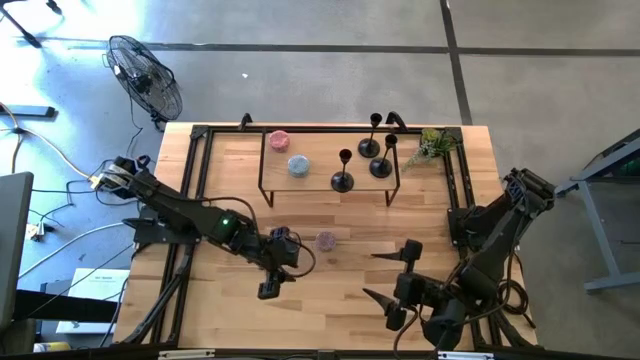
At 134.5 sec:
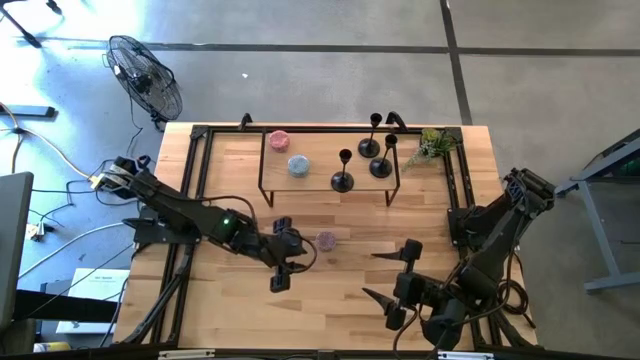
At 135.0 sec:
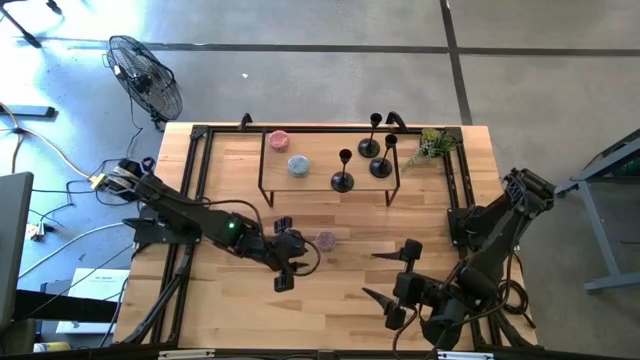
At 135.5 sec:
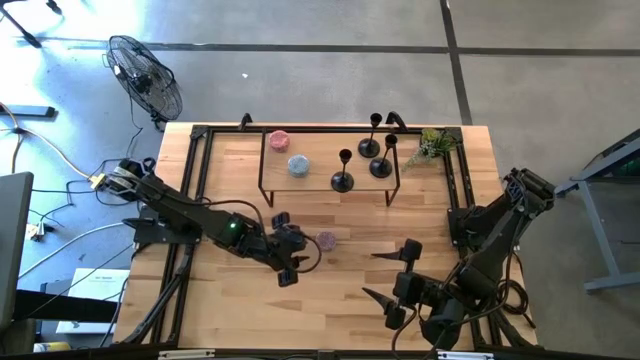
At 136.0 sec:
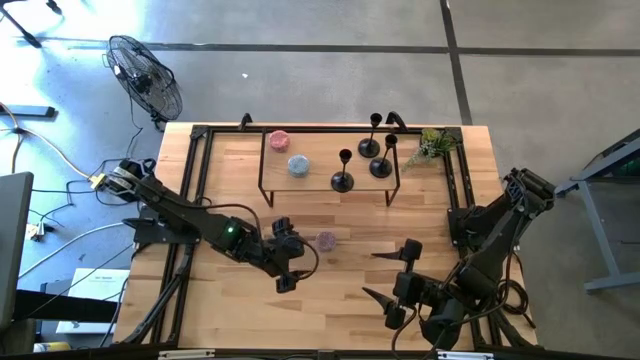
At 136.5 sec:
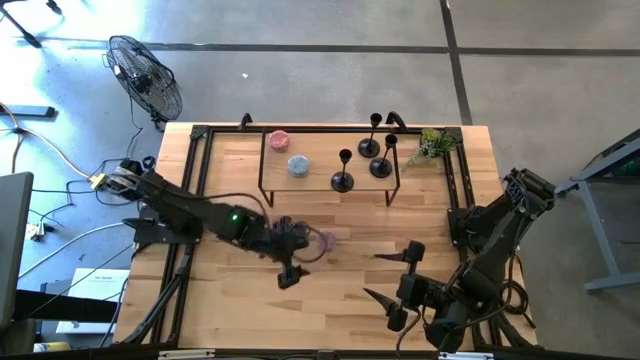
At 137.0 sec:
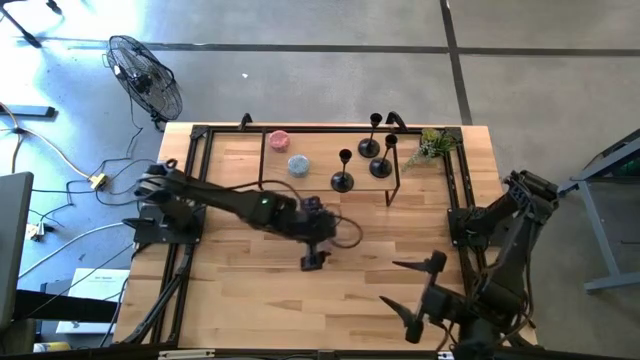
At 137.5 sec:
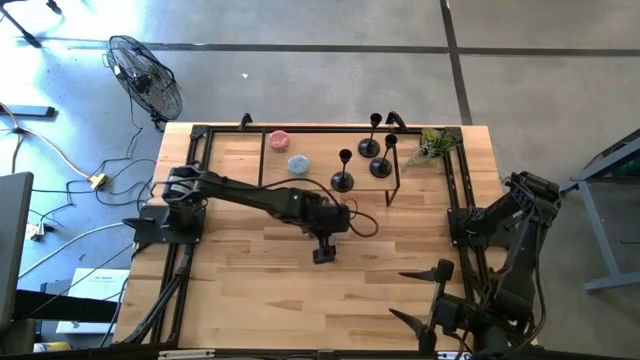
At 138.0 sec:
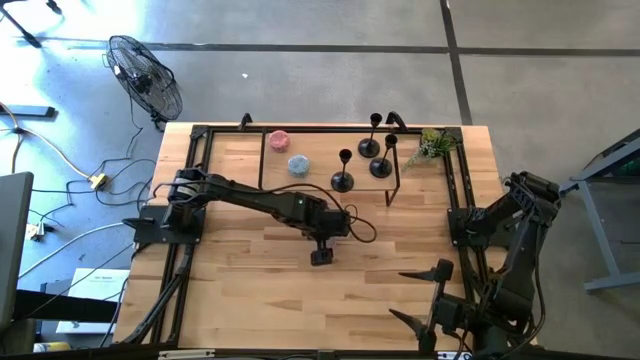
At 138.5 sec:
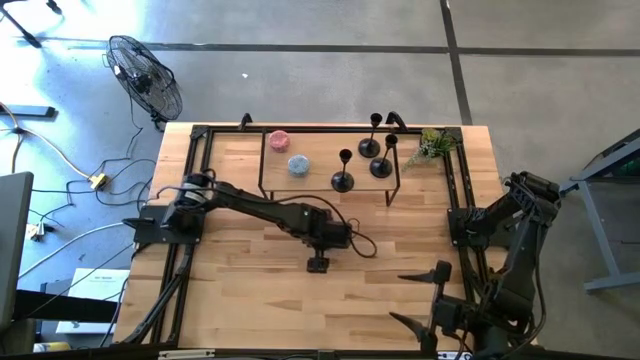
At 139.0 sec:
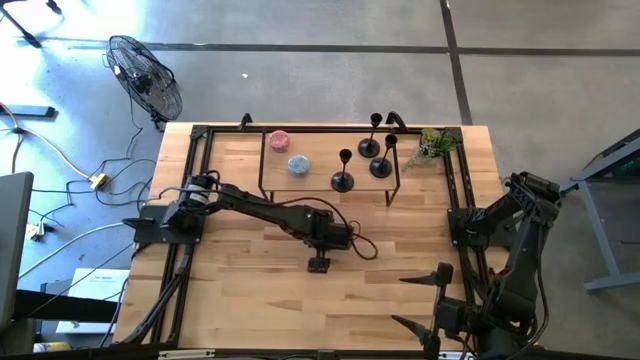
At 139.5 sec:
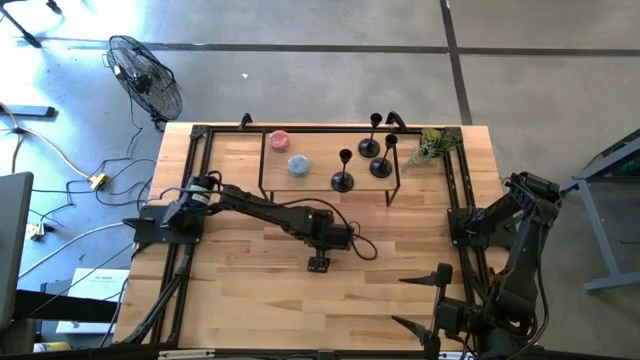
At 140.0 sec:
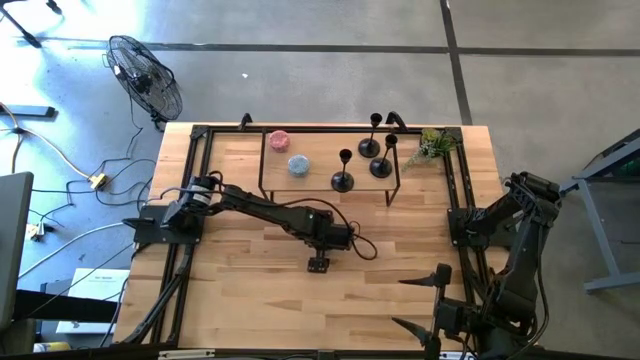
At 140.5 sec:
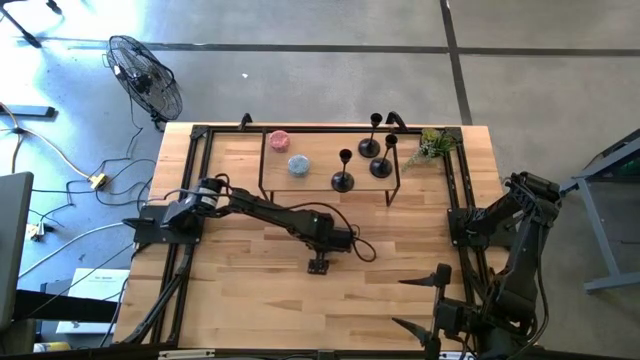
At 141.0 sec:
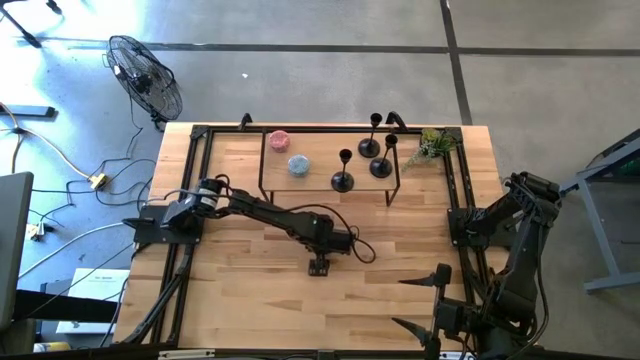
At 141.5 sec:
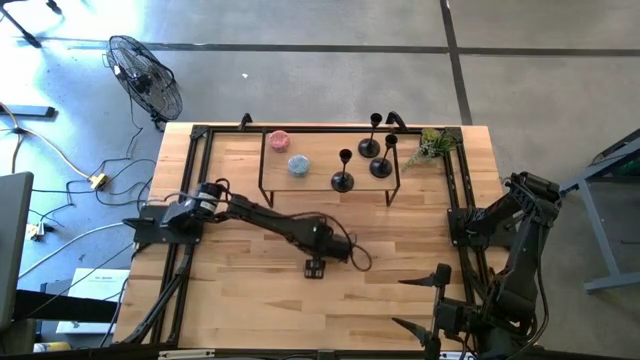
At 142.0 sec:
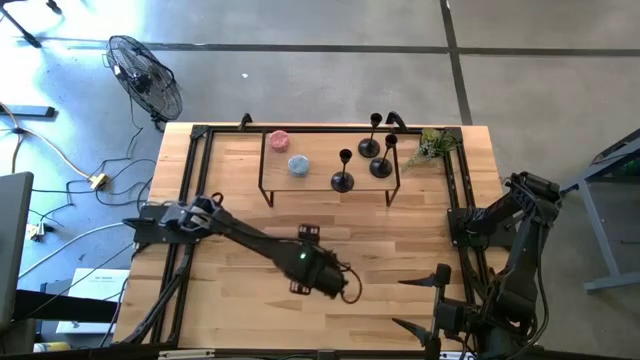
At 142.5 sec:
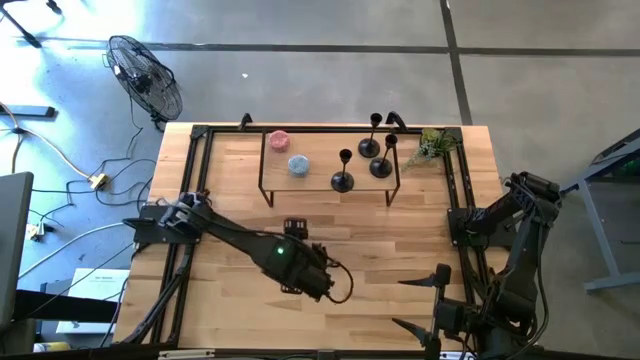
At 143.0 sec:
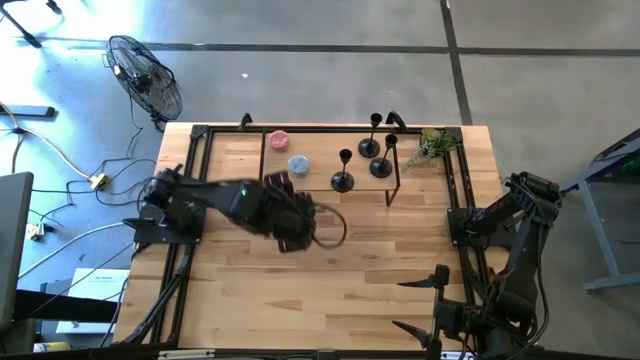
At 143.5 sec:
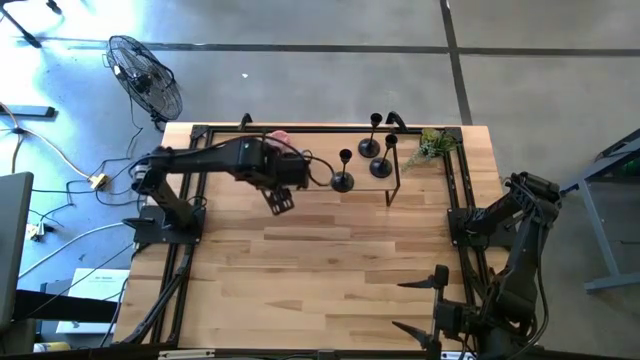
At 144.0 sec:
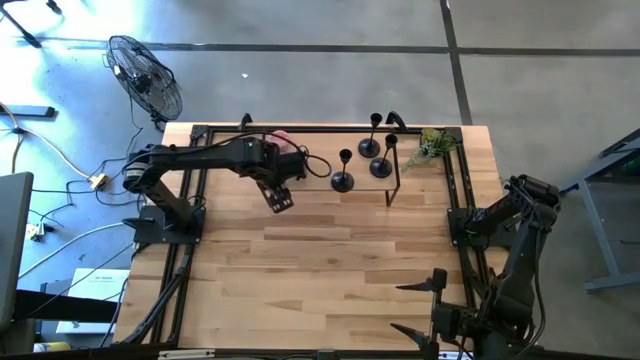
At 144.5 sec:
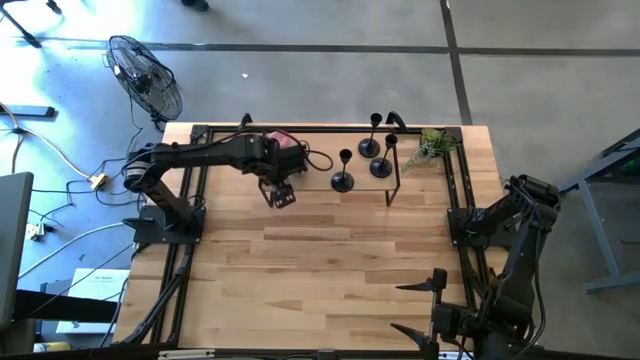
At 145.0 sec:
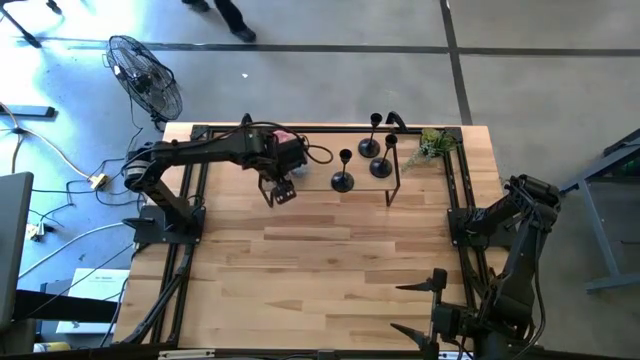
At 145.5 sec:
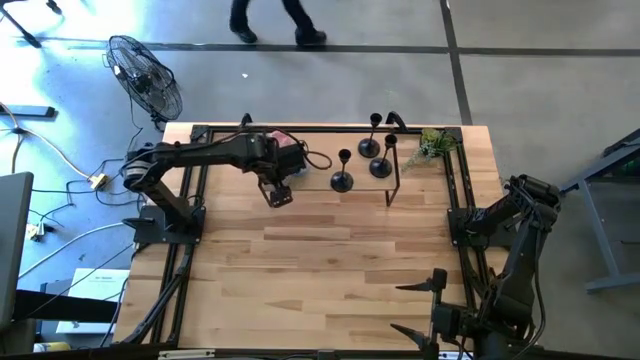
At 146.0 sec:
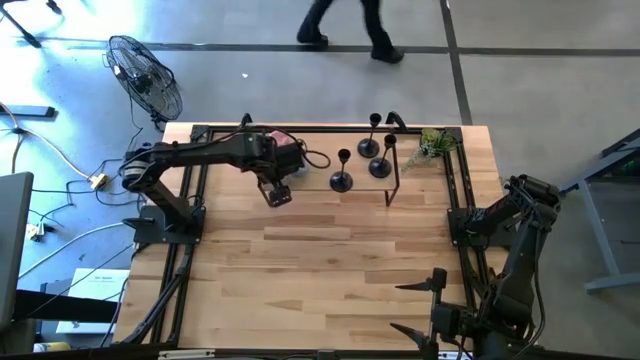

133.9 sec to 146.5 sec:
Task: Pick & Place candle stick holders
Put the red patterned scented candle on the shelf
